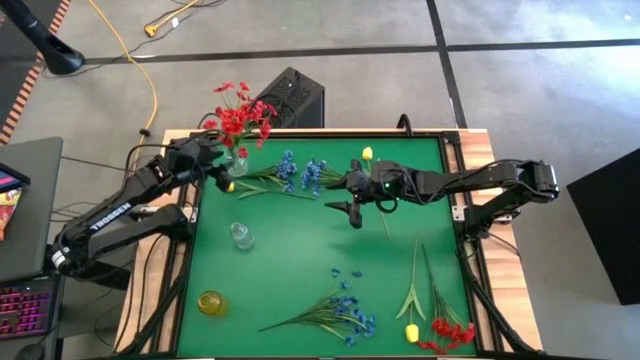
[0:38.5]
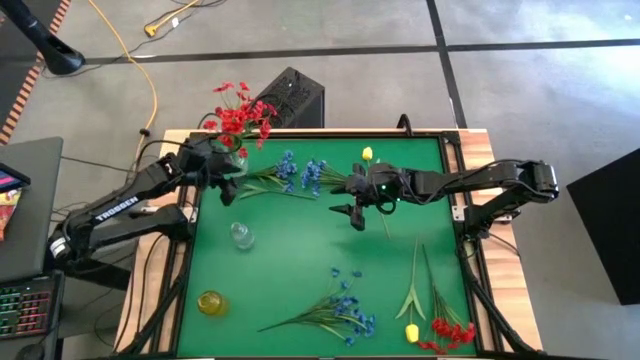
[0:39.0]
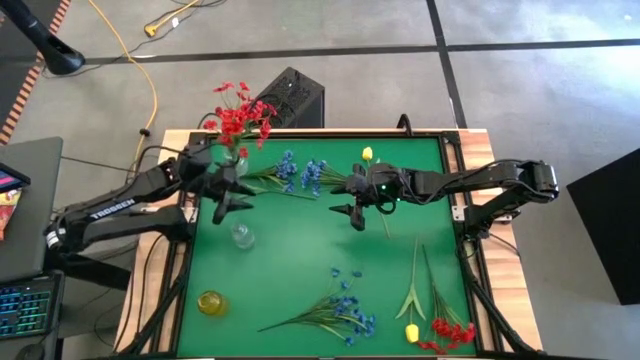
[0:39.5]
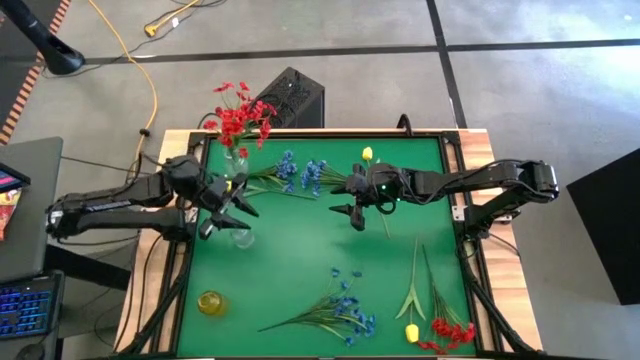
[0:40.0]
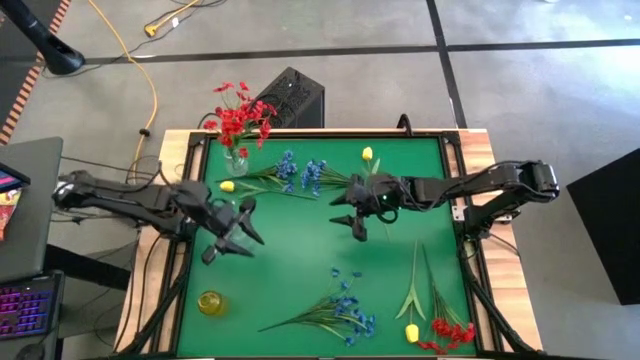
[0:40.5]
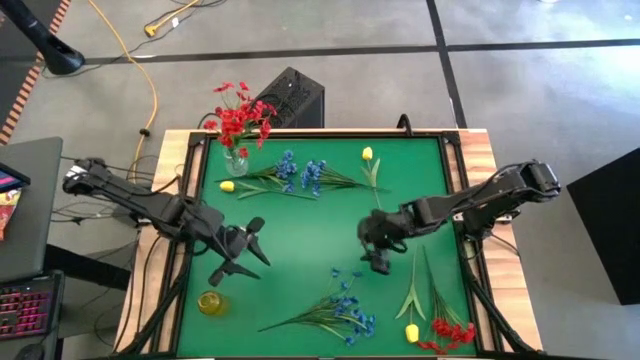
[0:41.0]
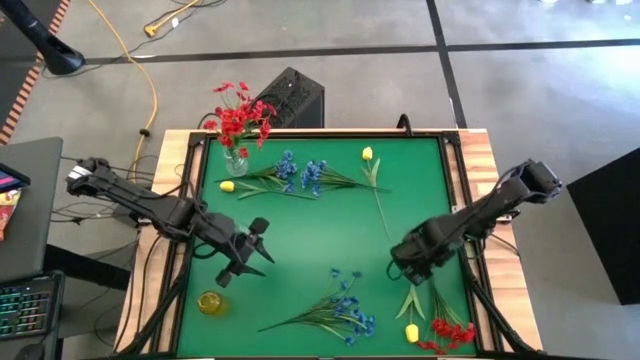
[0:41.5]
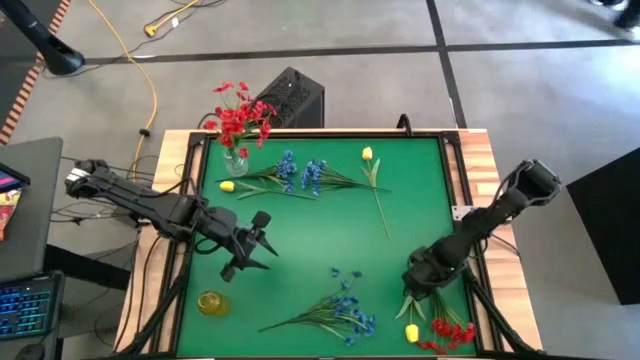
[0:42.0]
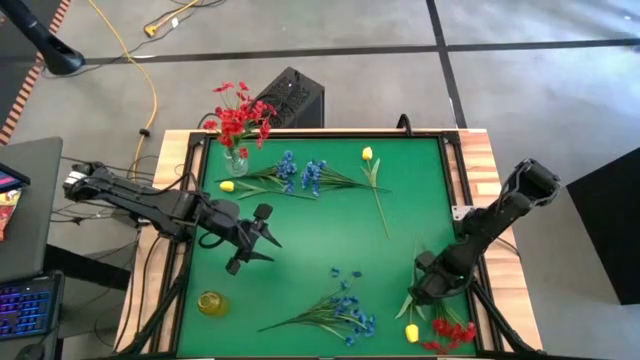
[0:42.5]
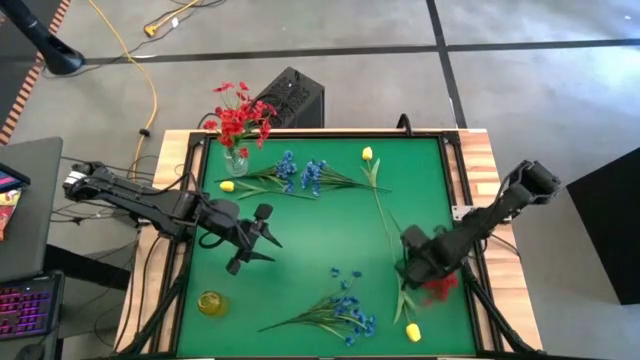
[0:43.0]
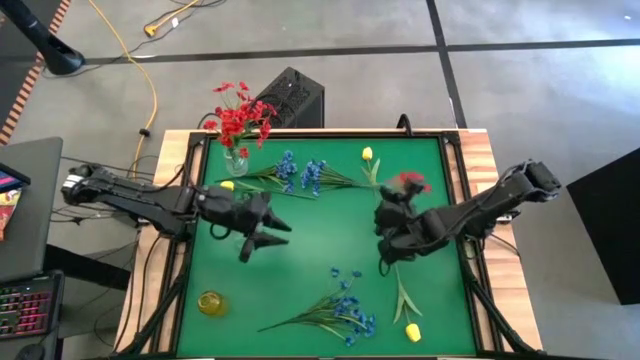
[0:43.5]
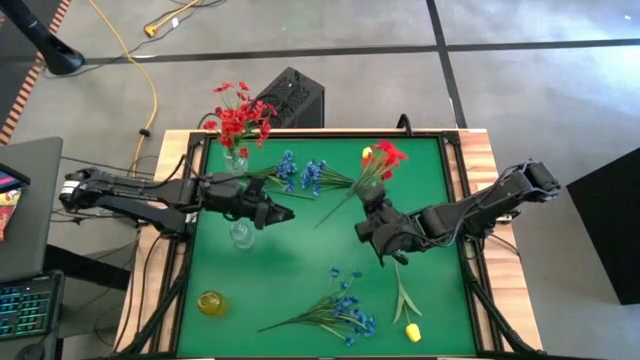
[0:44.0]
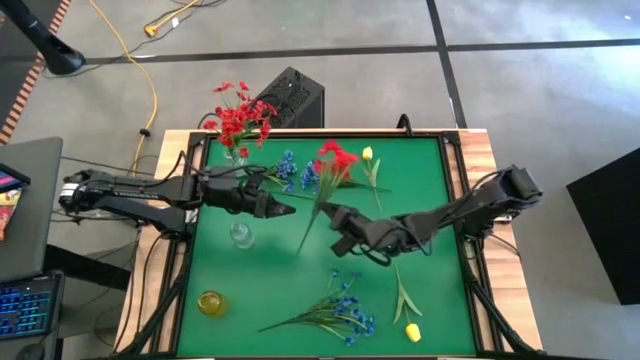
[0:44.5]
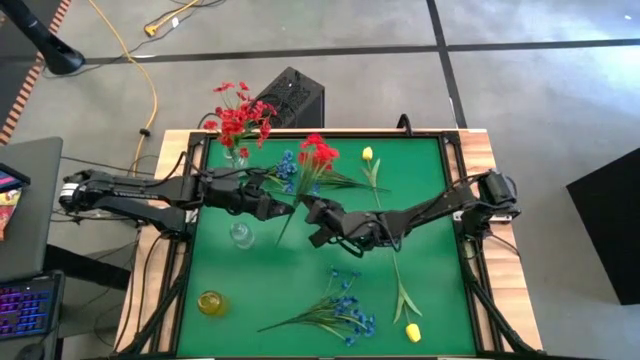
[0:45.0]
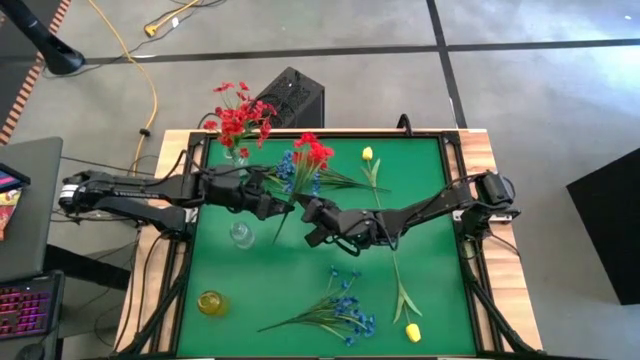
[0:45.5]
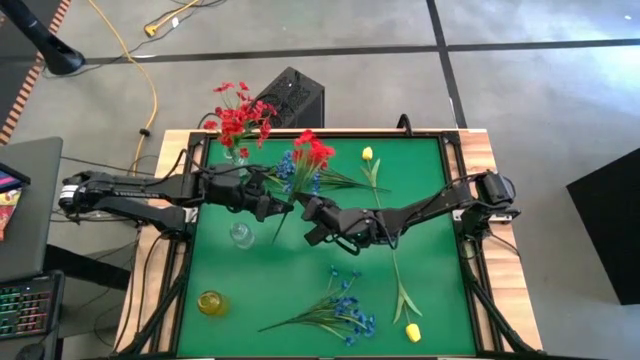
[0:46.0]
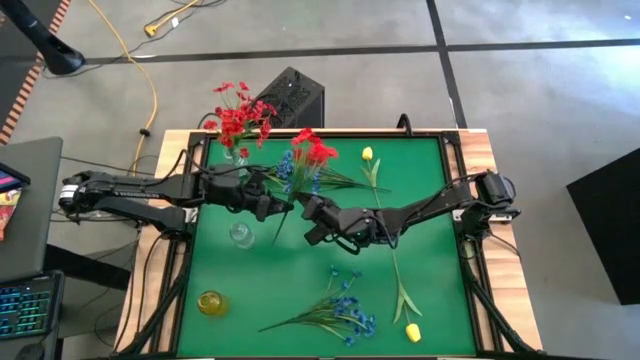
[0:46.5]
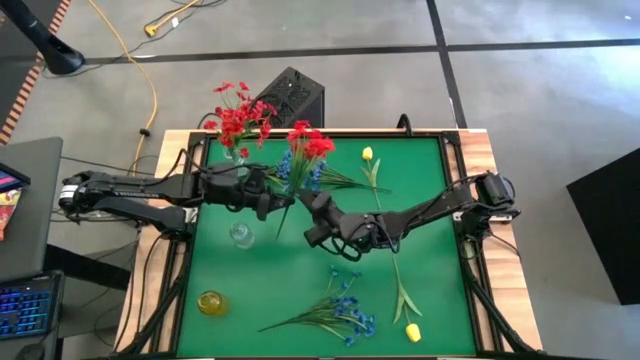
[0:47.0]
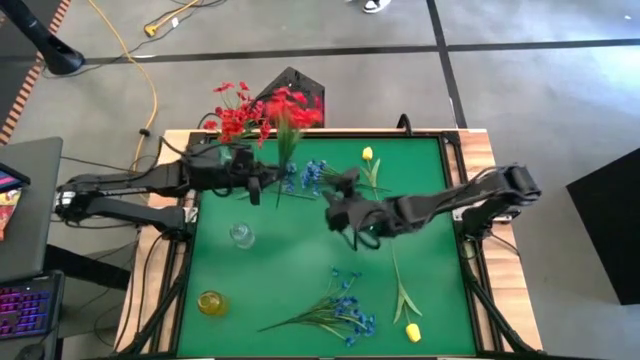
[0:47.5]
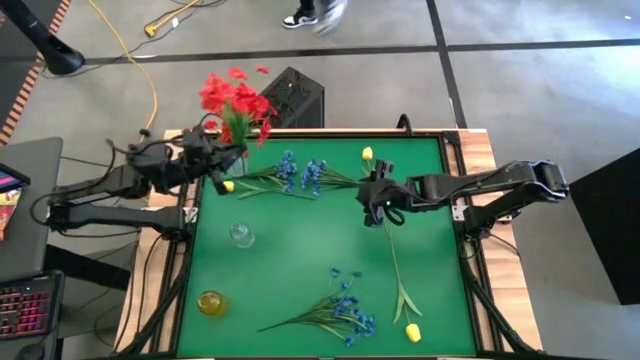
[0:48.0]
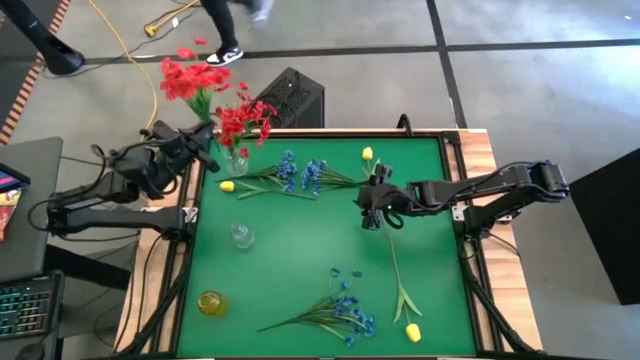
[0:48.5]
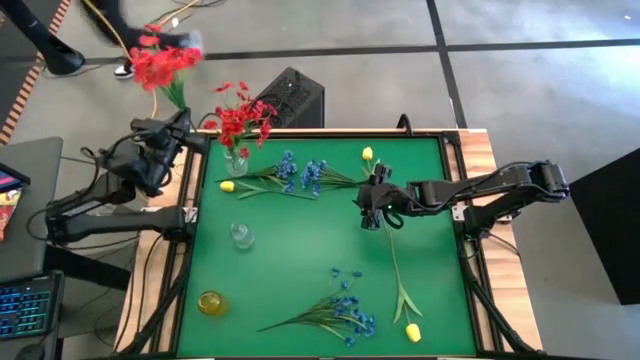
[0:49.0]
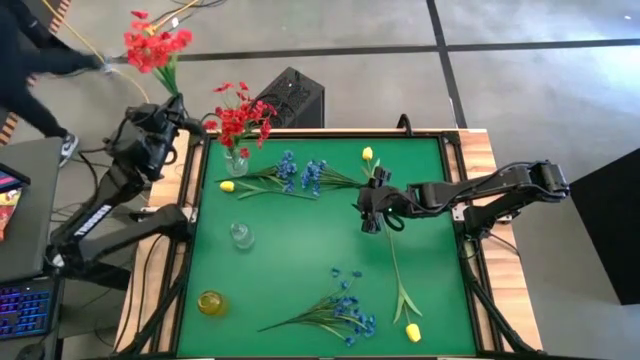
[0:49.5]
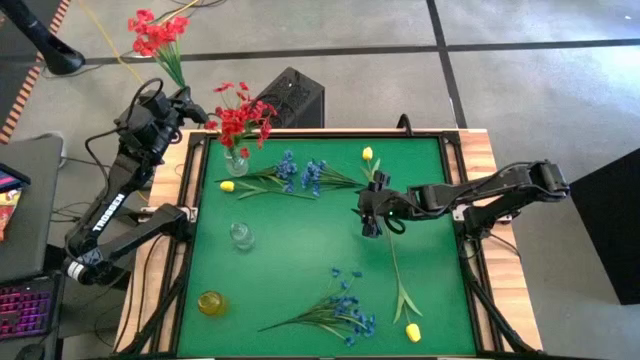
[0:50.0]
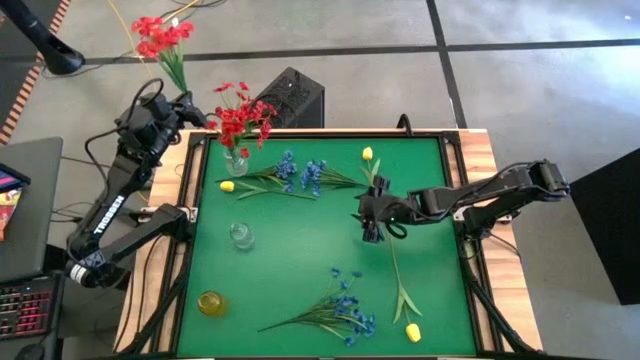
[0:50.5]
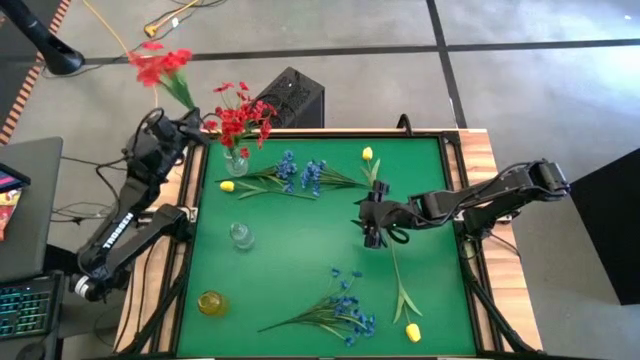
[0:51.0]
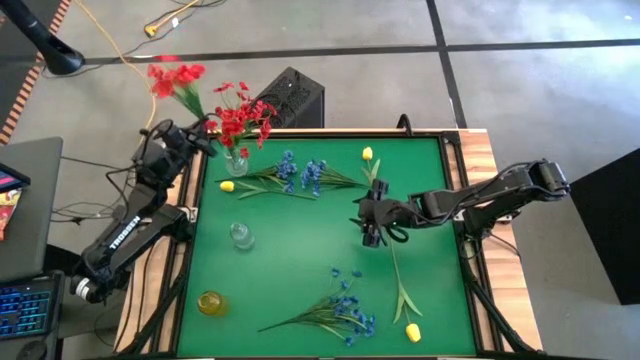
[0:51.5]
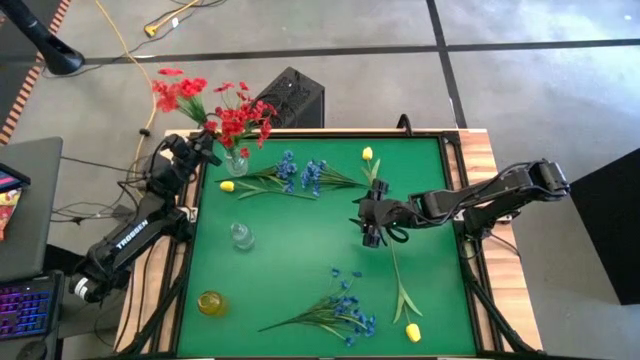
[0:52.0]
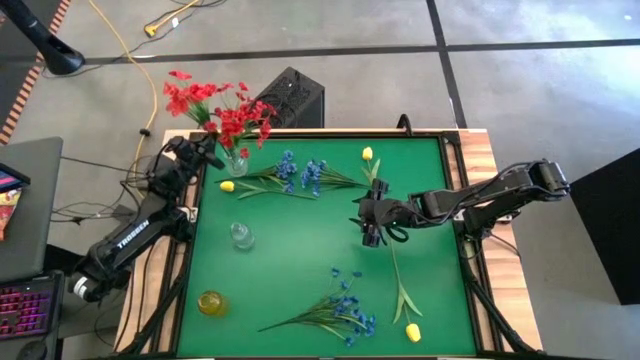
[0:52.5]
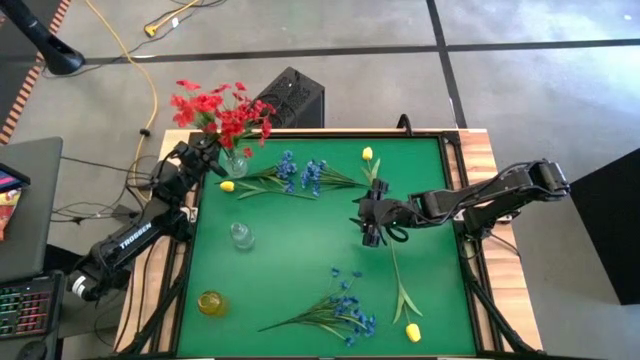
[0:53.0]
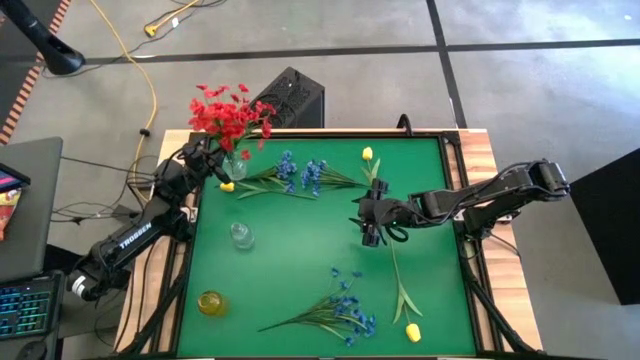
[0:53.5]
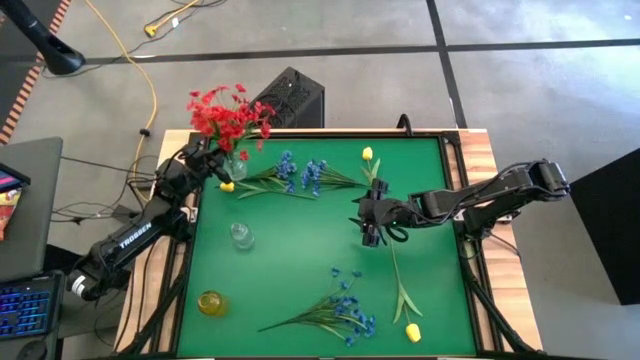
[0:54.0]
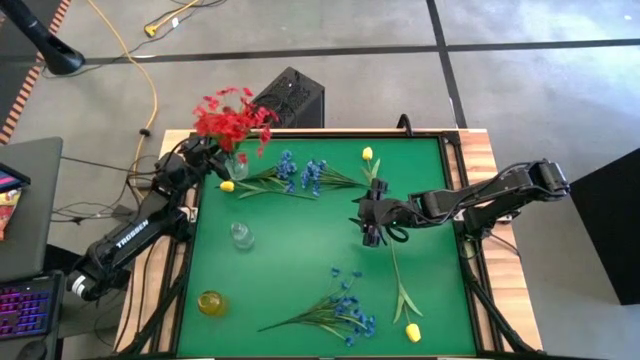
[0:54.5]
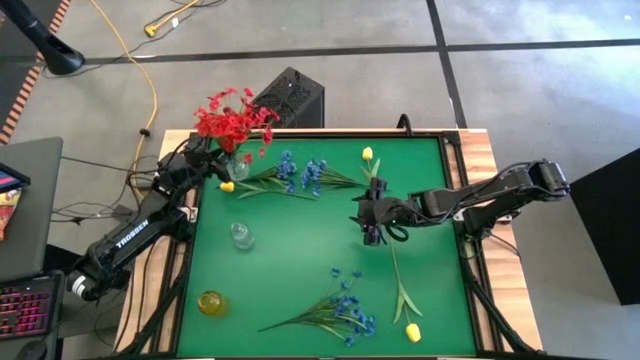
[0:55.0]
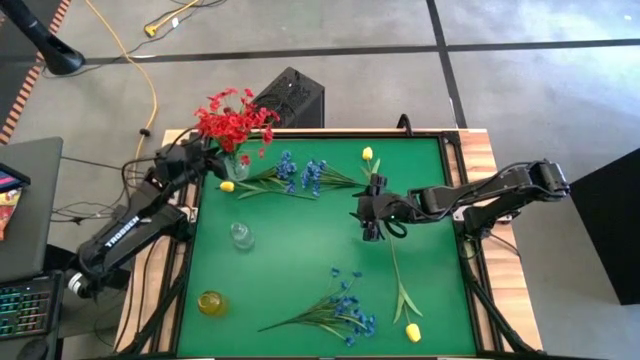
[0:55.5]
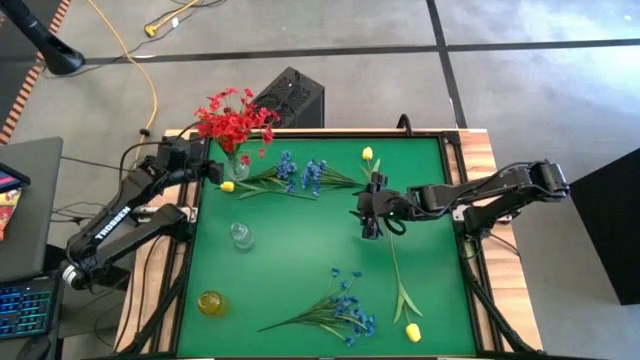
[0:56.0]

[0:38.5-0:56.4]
Task: Sort flowers into vase by color
Put the red flowers into the top transparent vase
